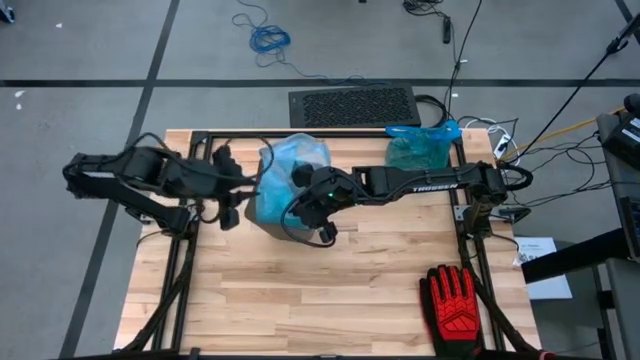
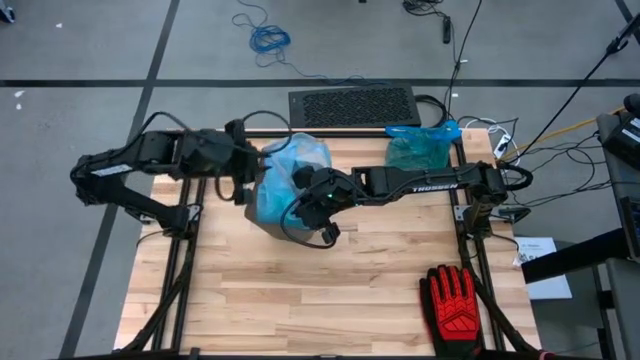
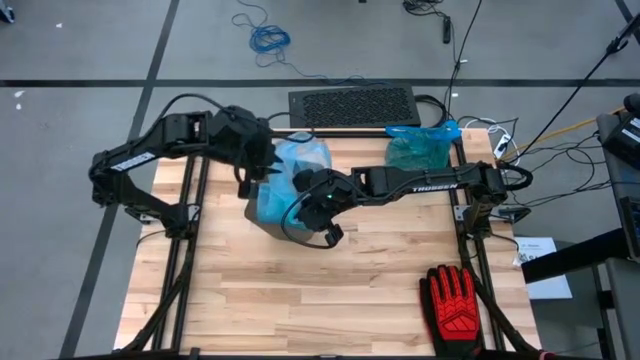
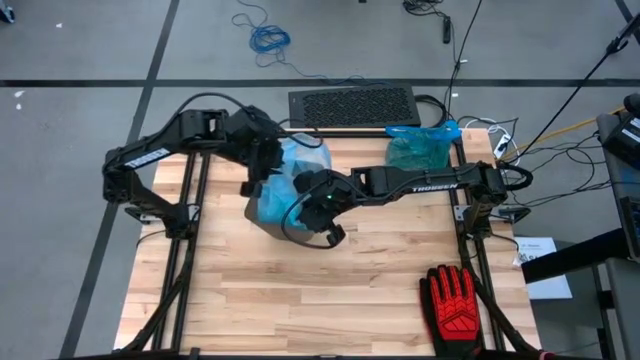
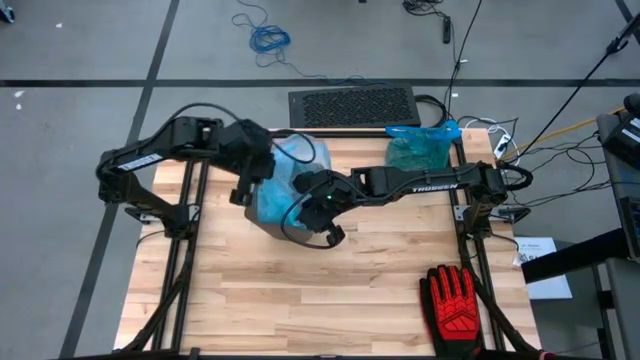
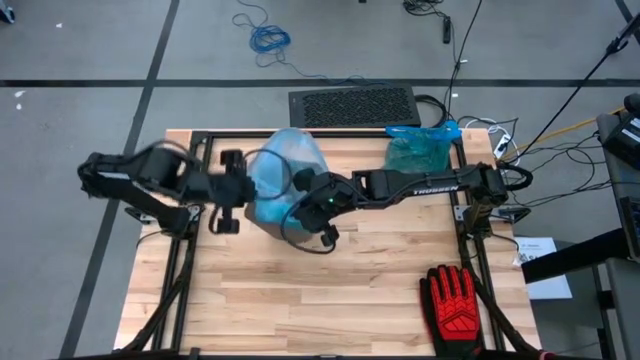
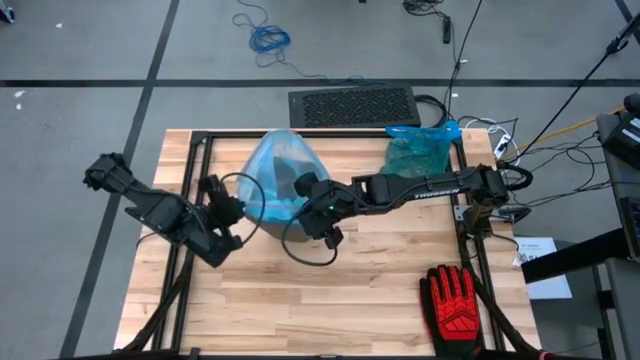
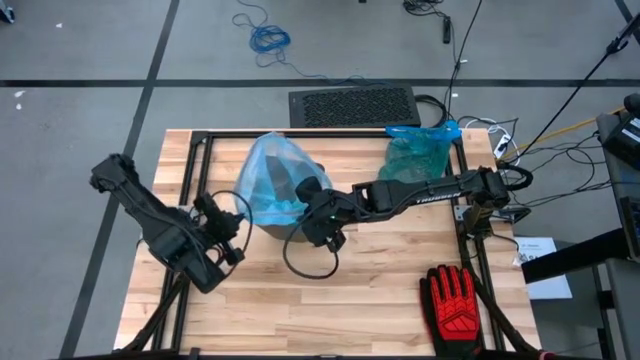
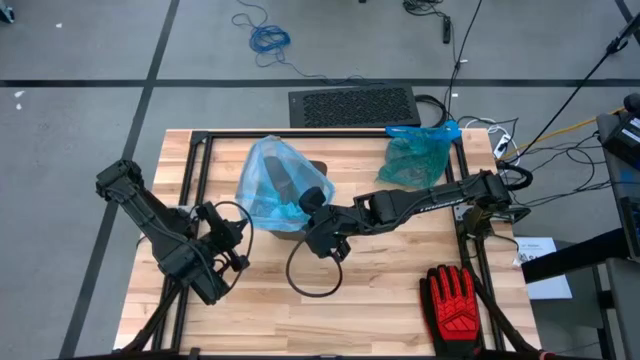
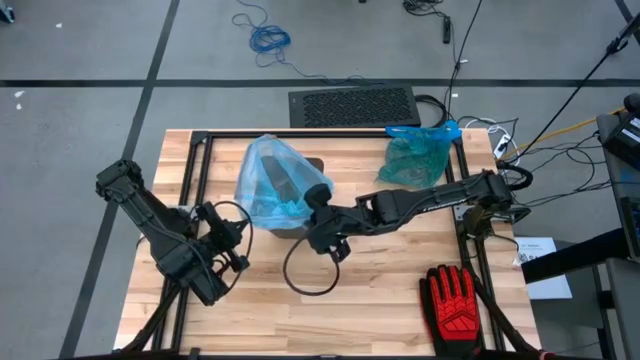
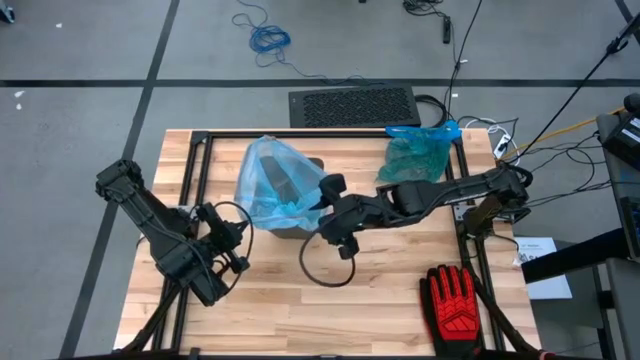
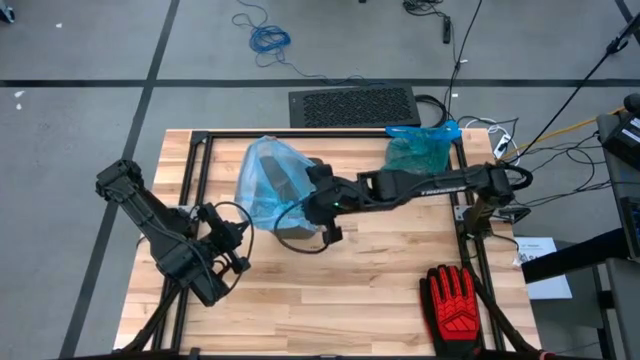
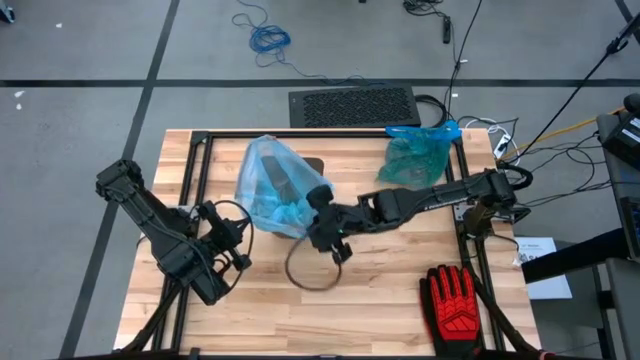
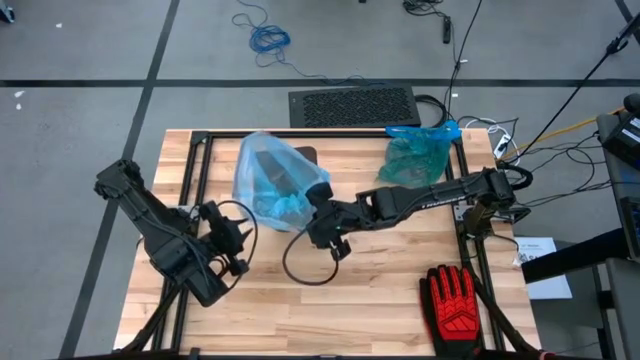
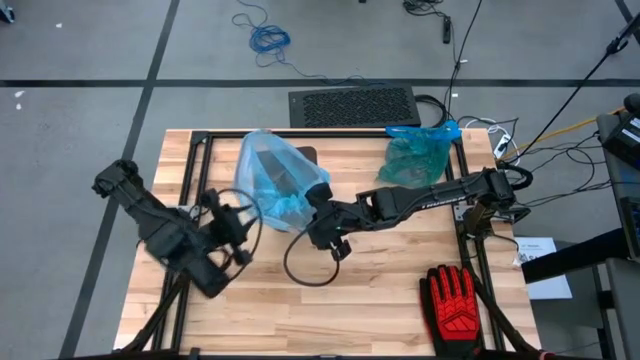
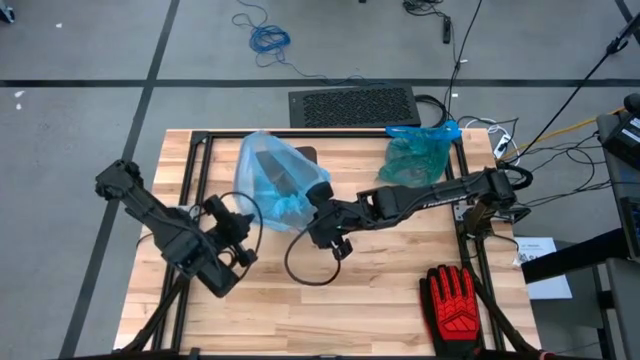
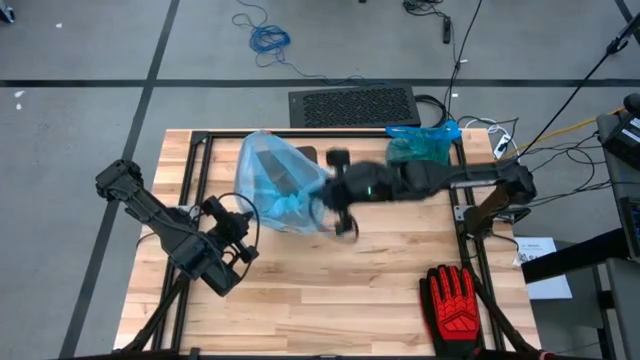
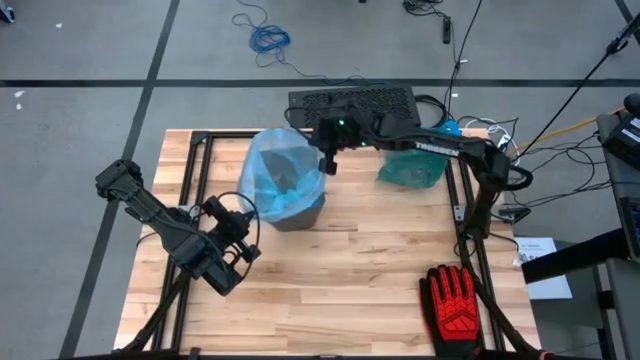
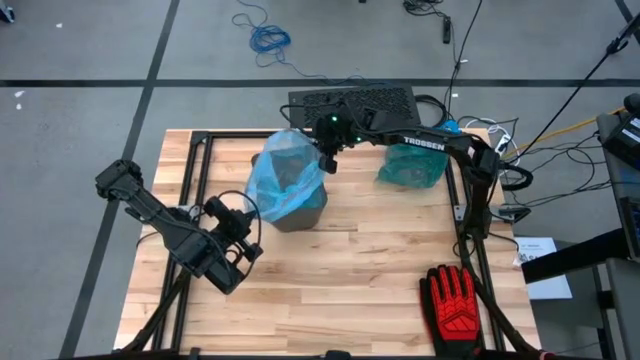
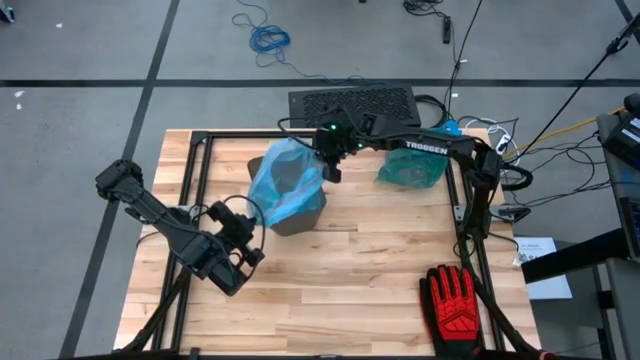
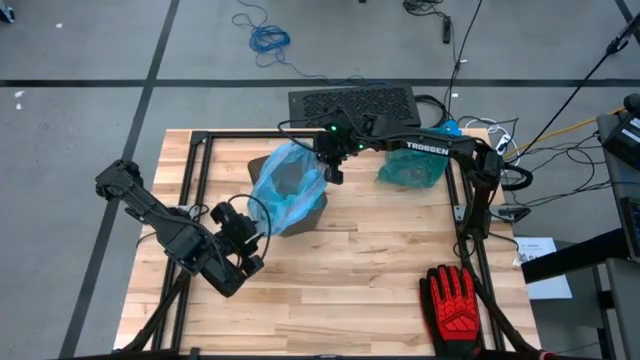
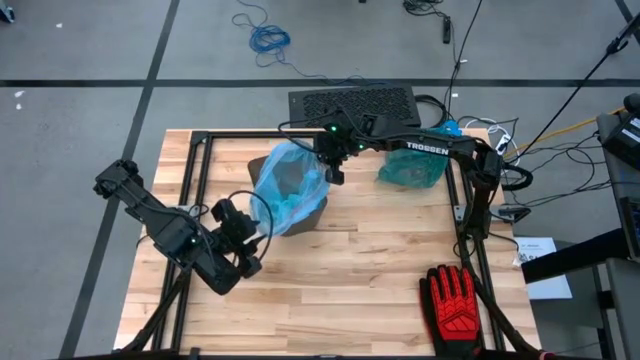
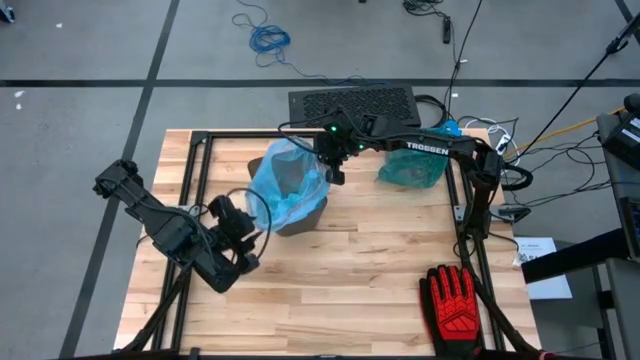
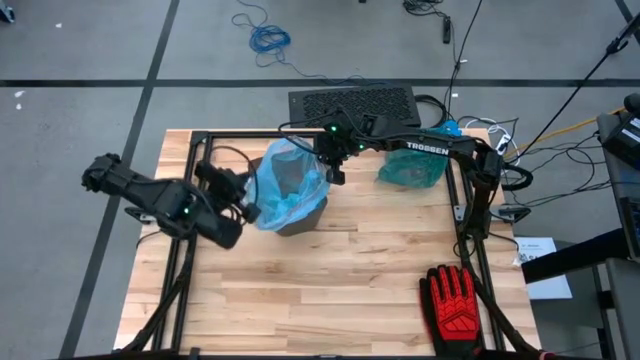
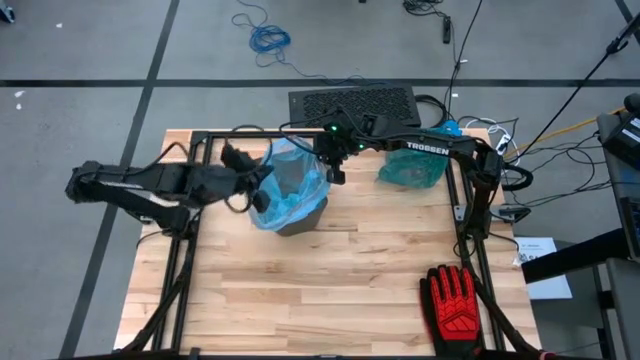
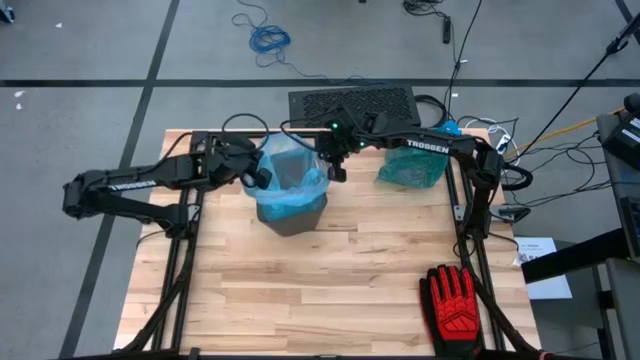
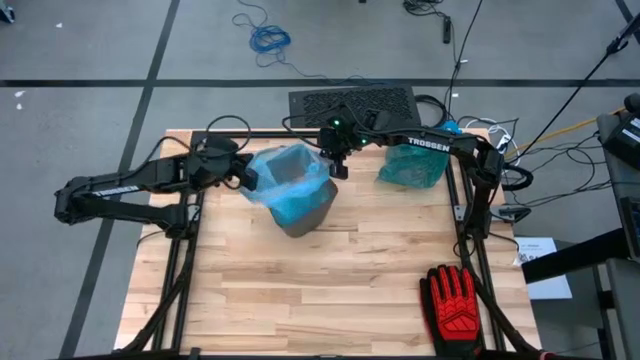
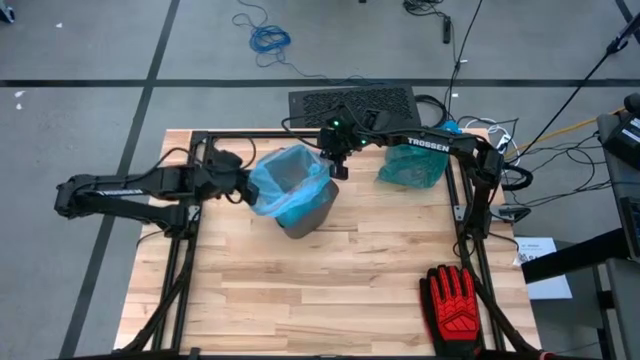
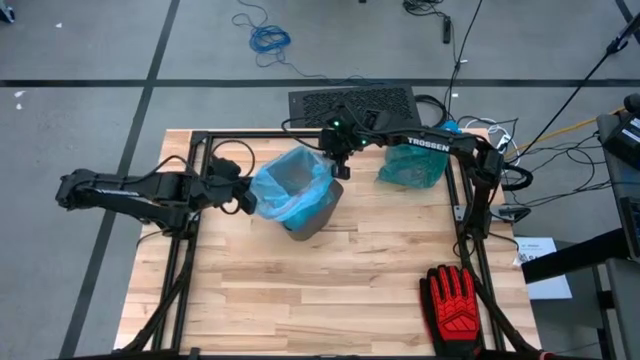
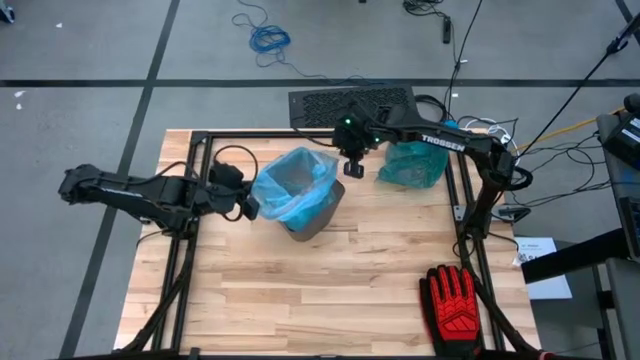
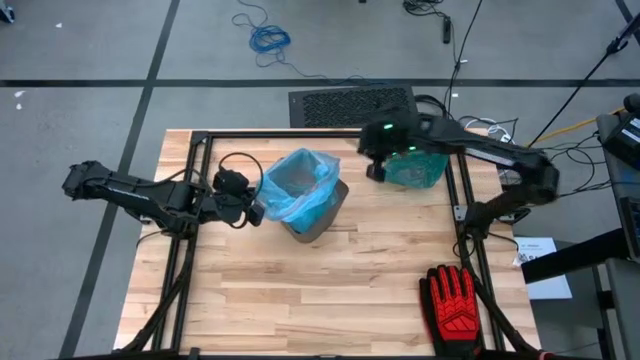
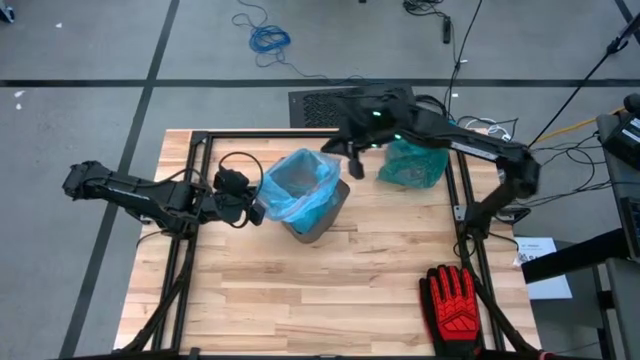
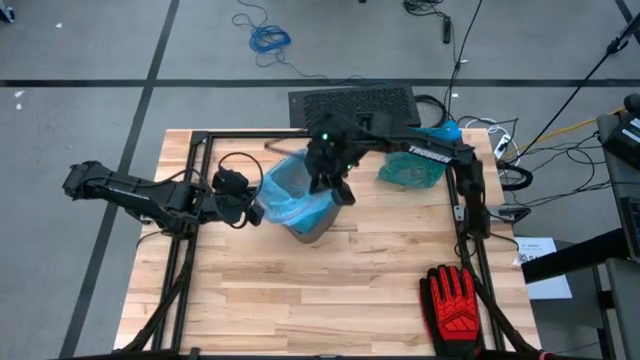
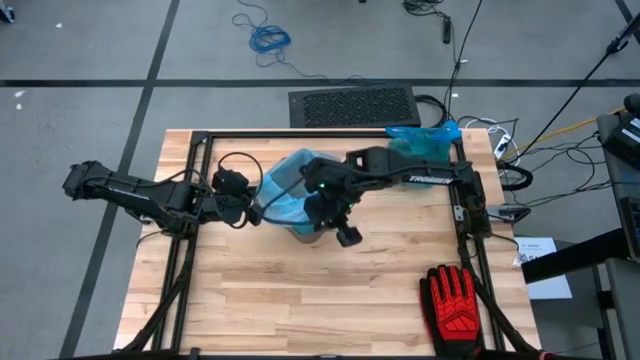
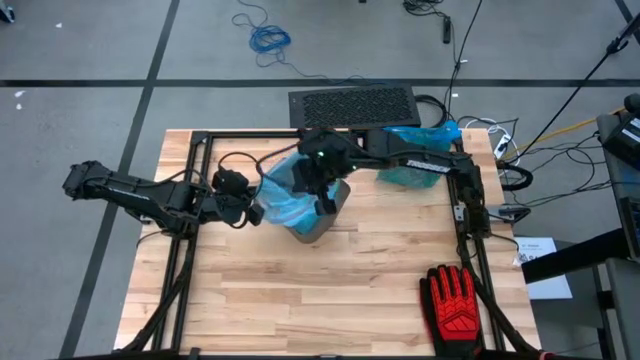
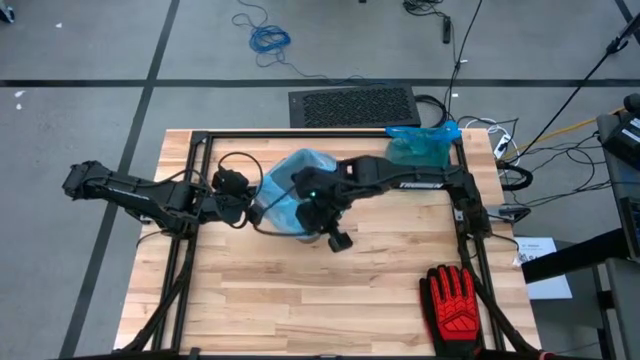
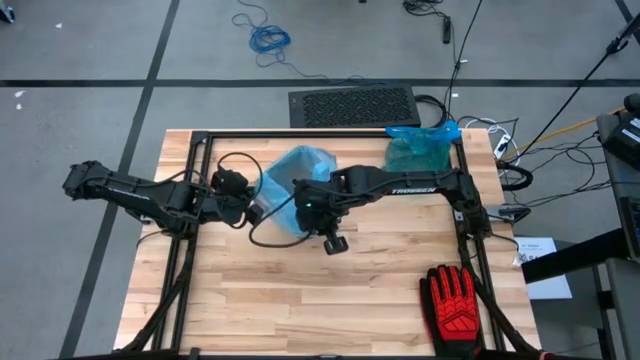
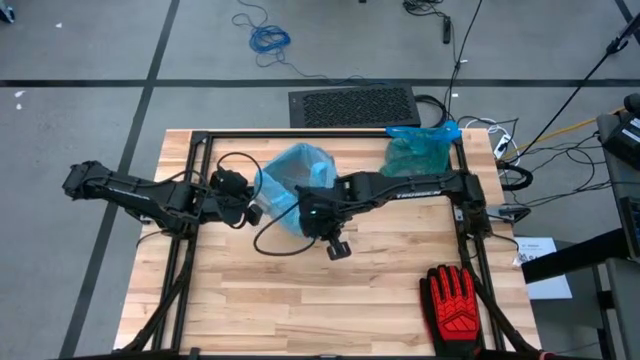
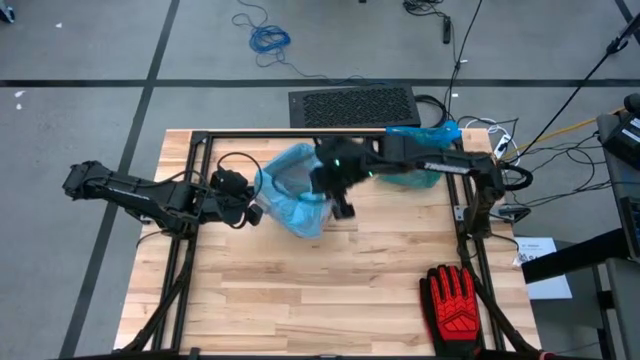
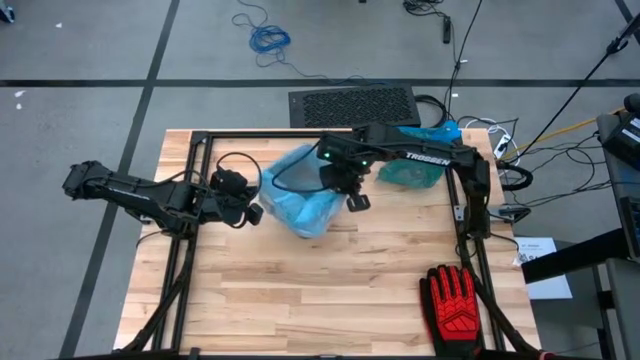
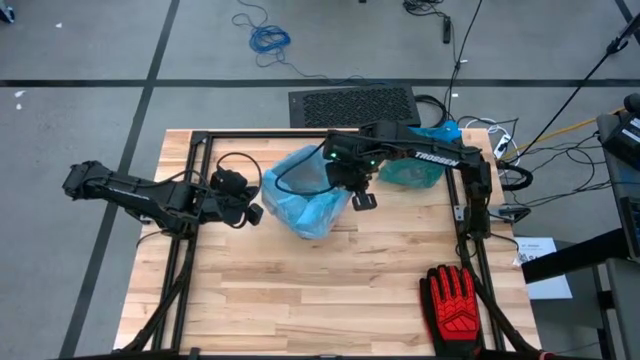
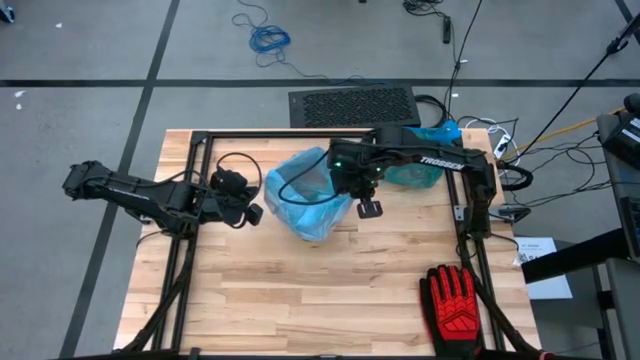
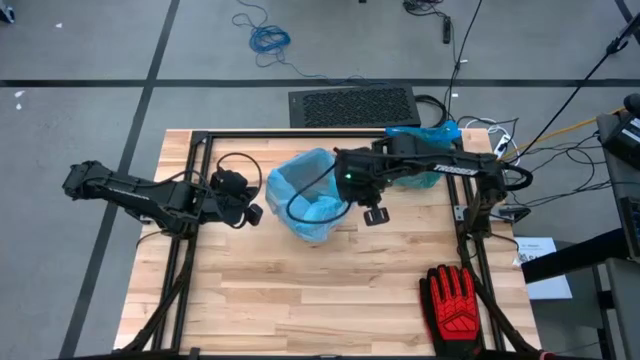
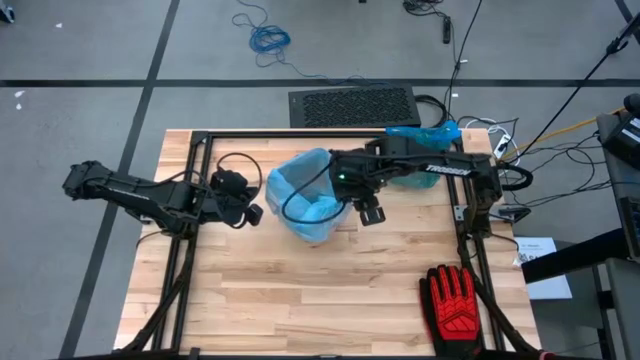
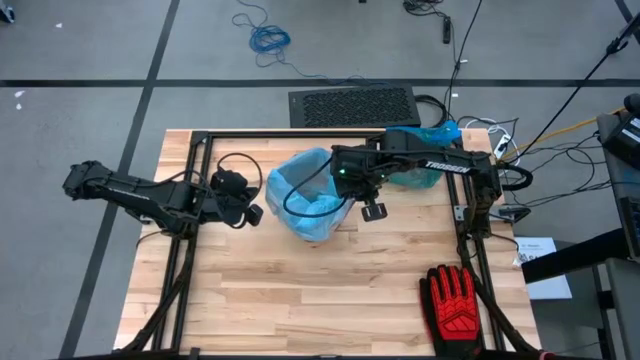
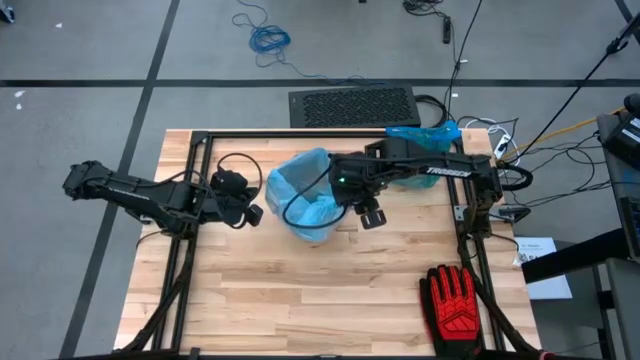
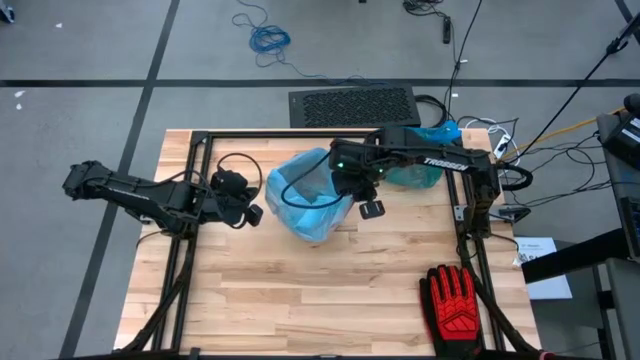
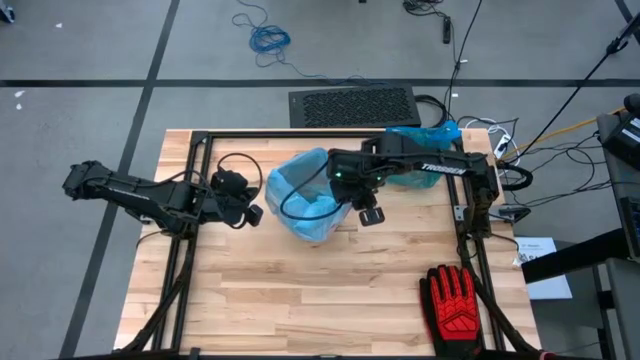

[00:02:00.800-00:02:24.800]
Task: place trash/remove bag and relplace
Insert the blue trash bag into the black trash bin
